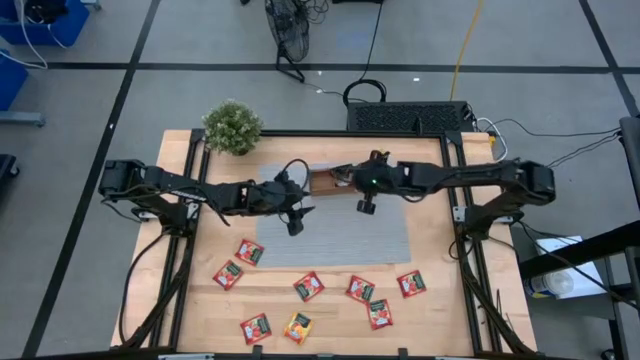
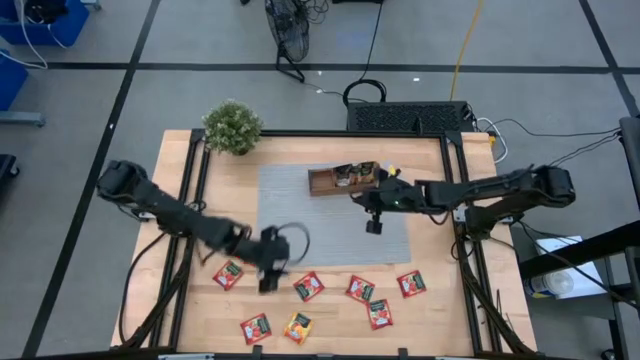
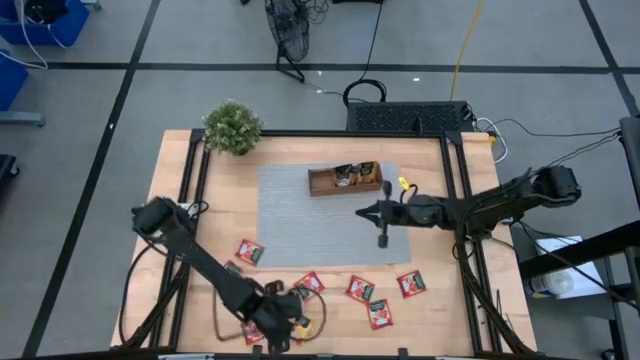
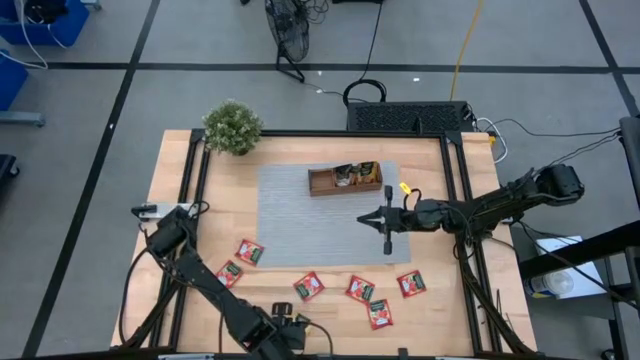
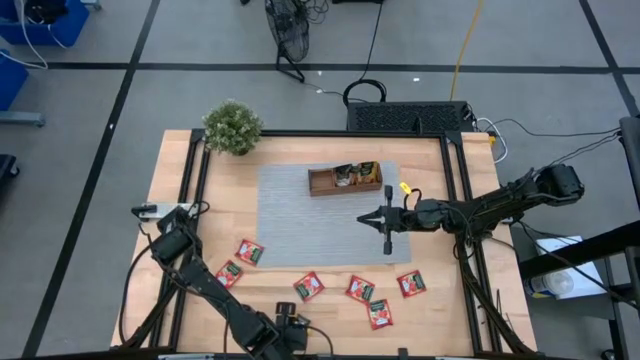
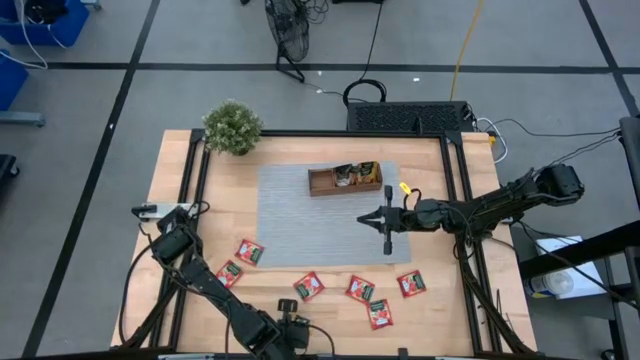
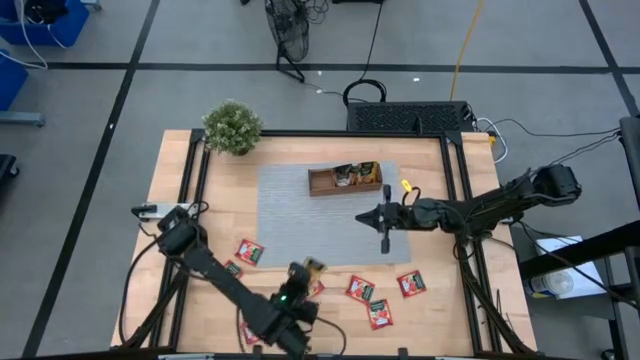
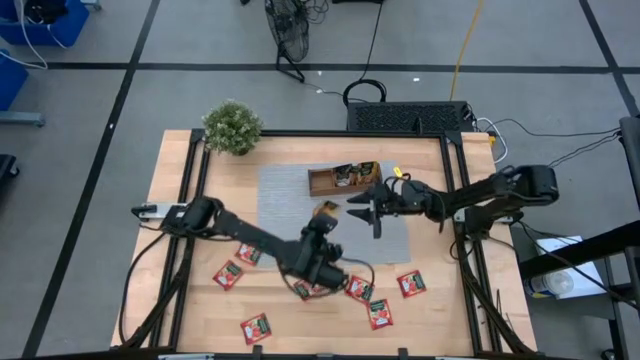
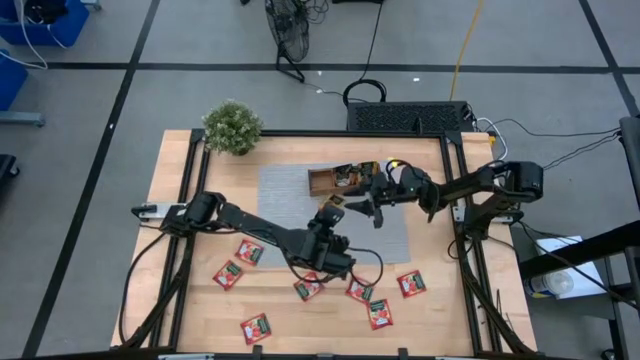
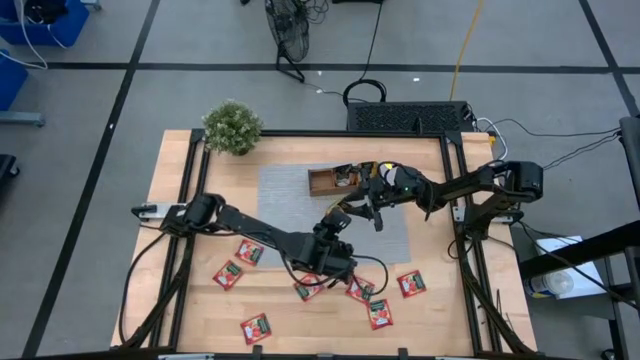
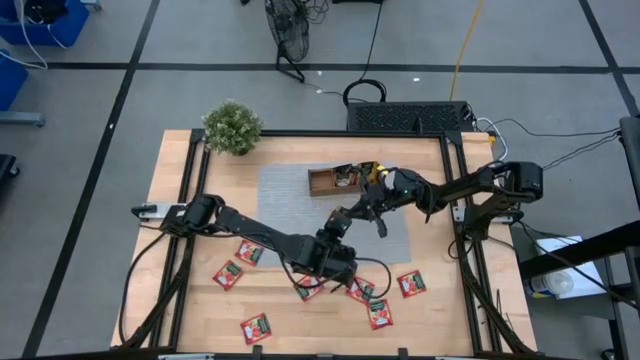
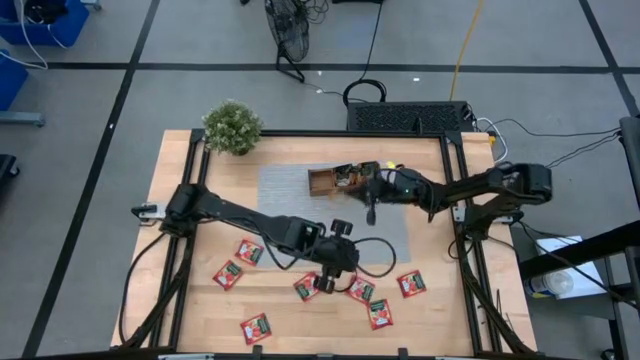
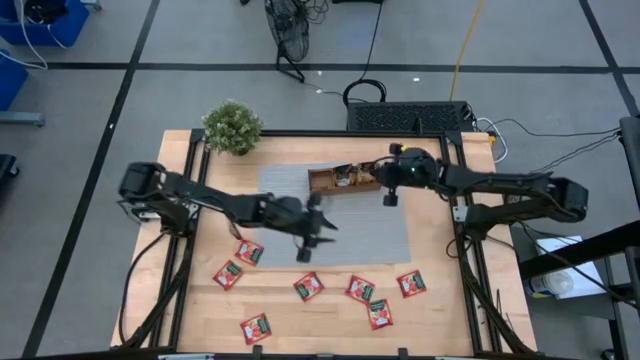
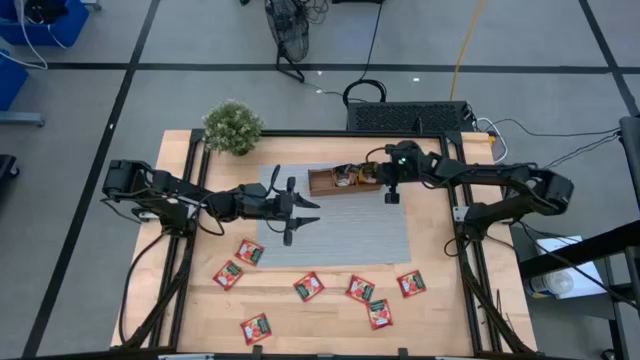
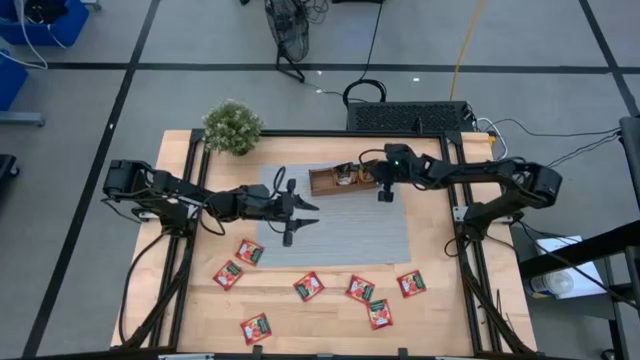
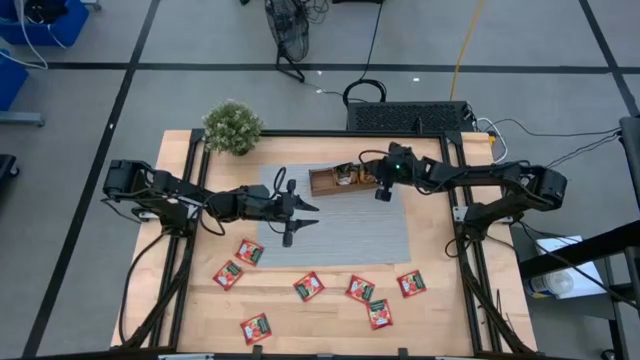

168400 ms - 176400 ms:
Task: Pick & Place Tea
Put the yellow tea bag into the right section of the wooden organizer

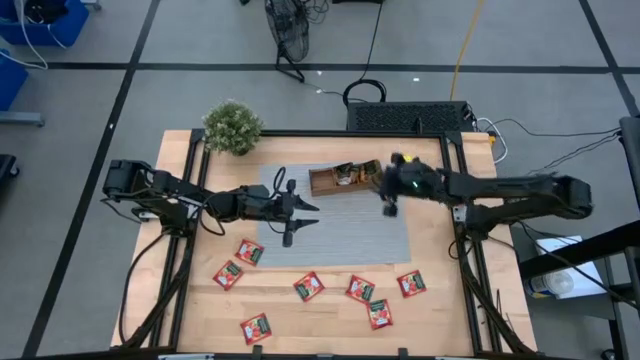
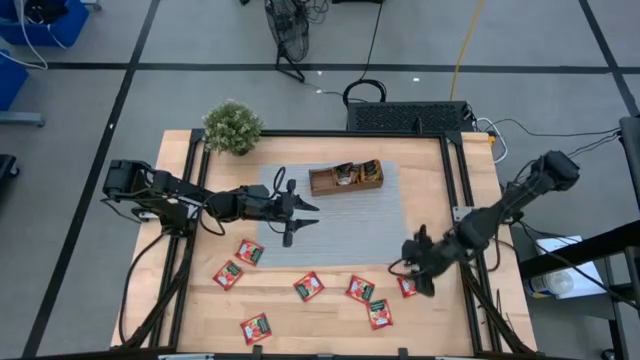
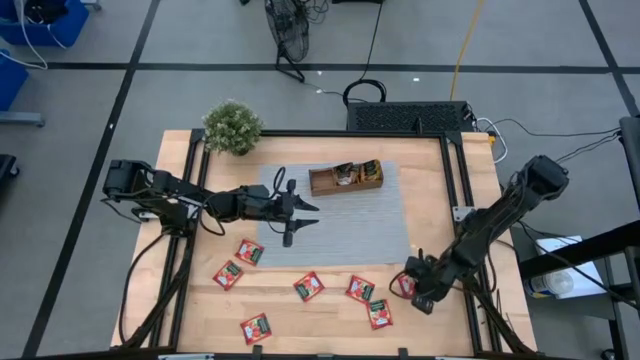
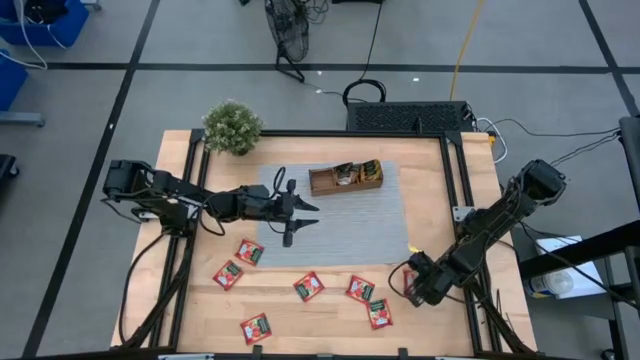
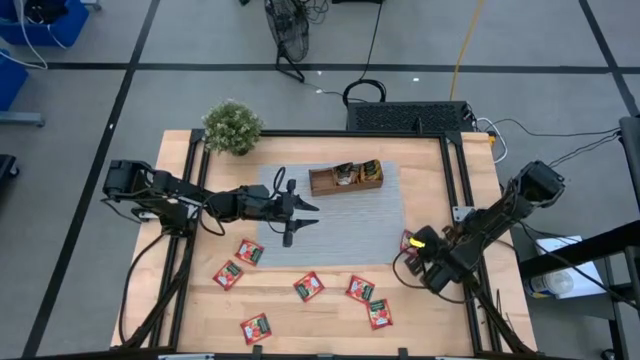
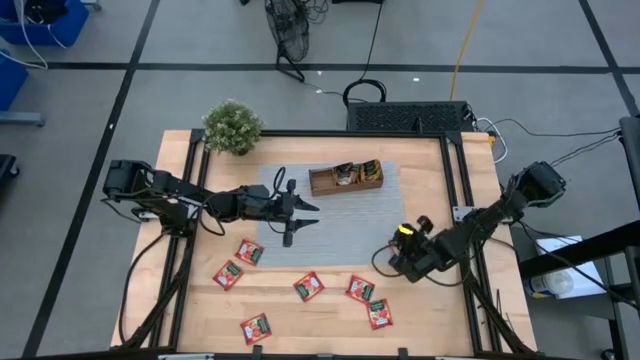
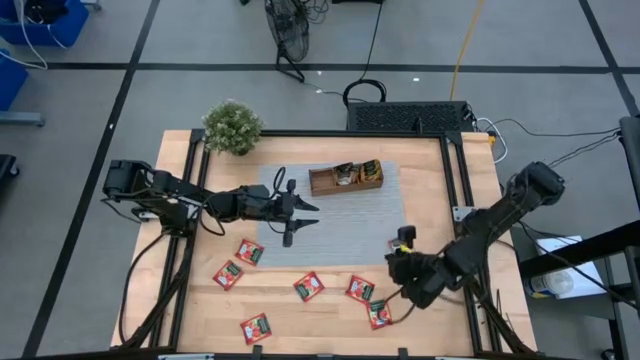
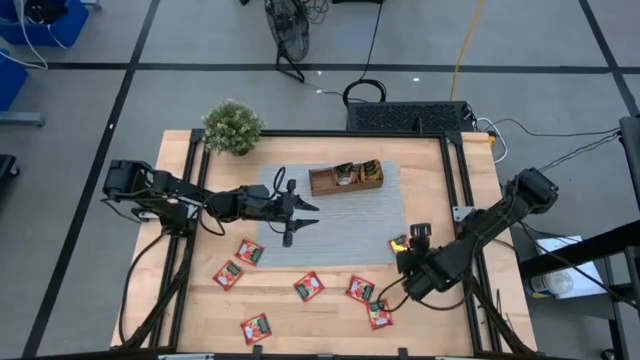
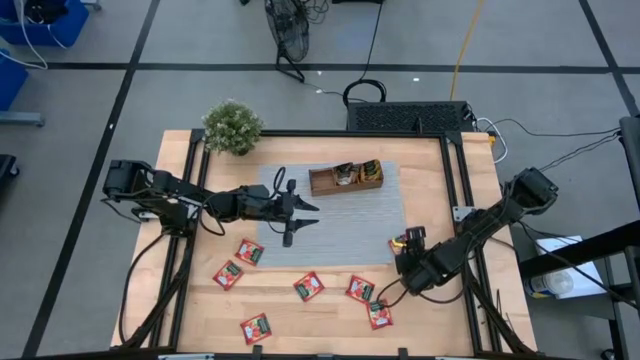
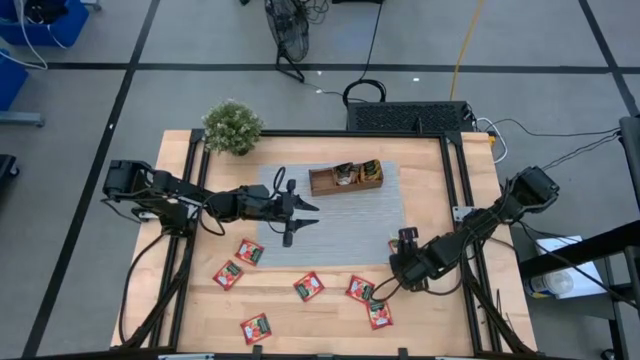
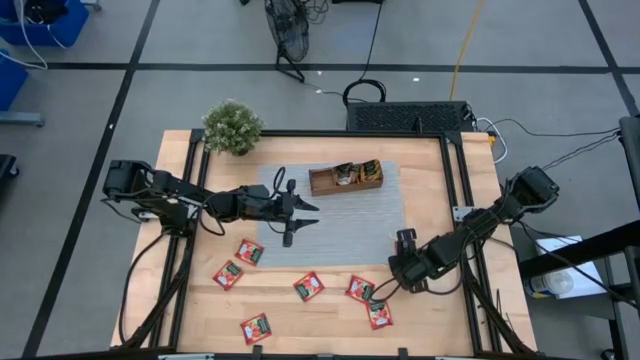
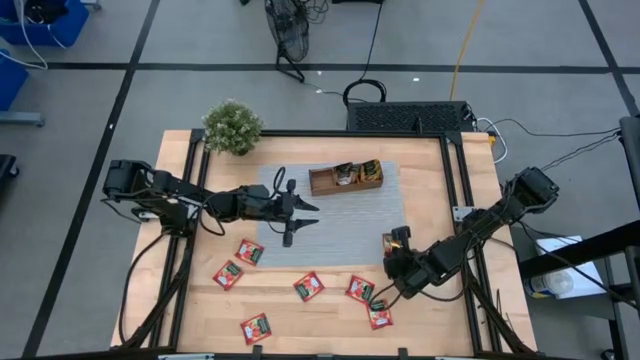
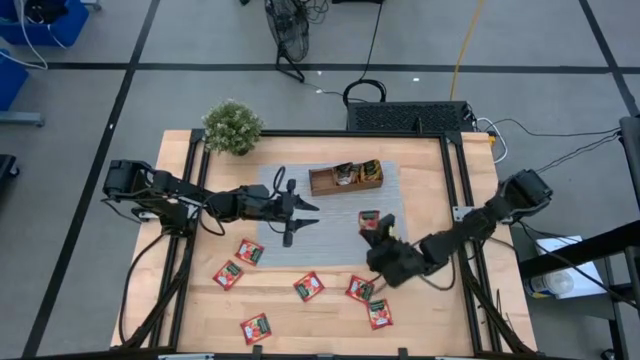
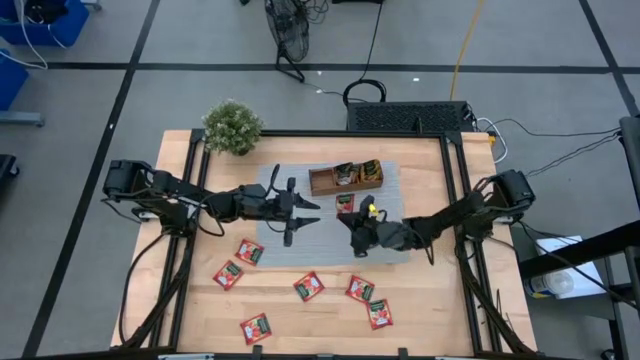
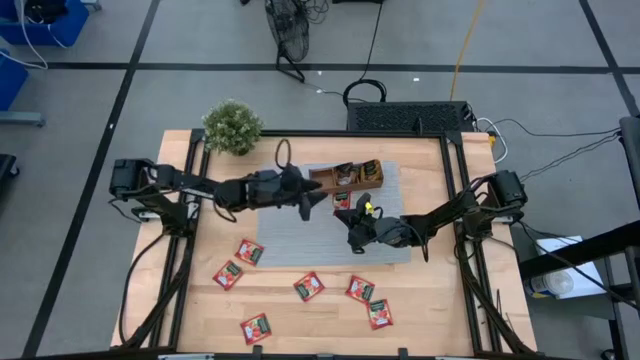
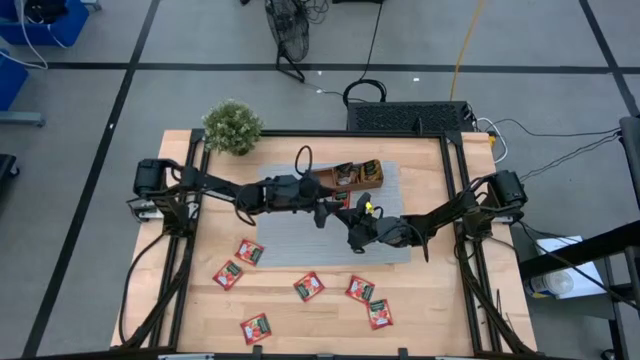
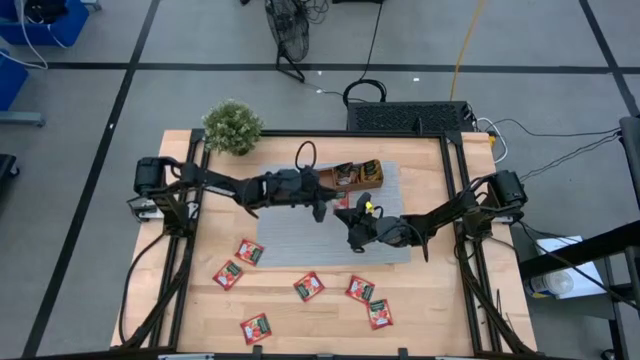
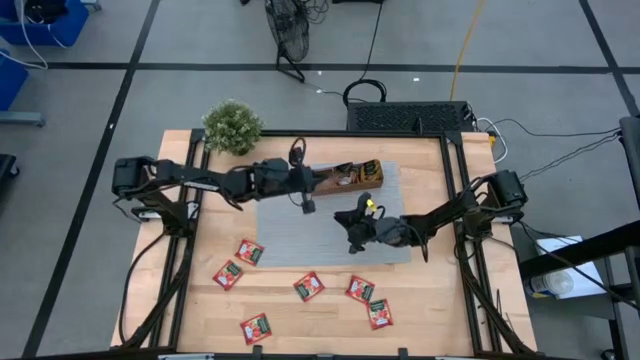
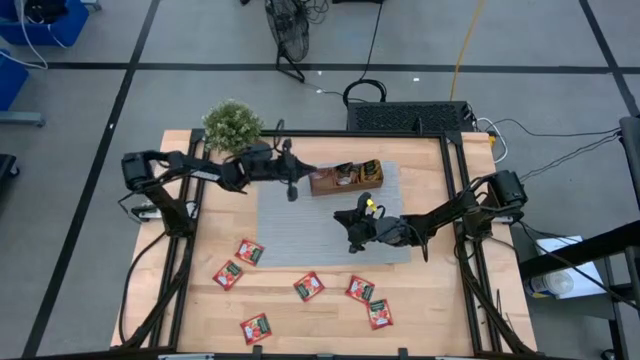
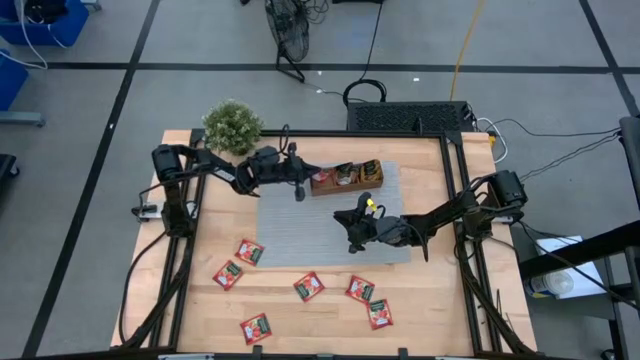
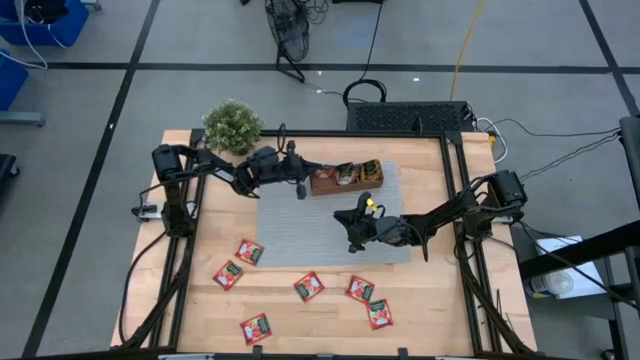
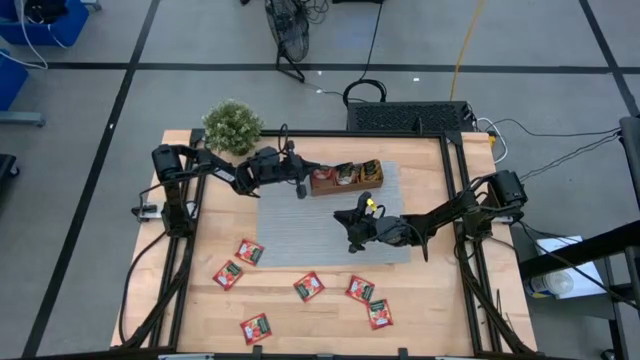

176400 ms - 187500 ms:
Put the red tea bag into the left section of the wooden organizer

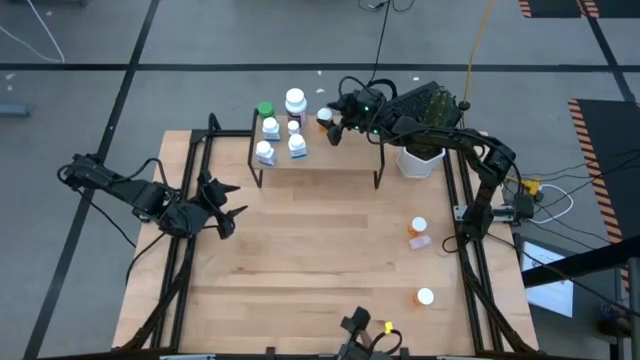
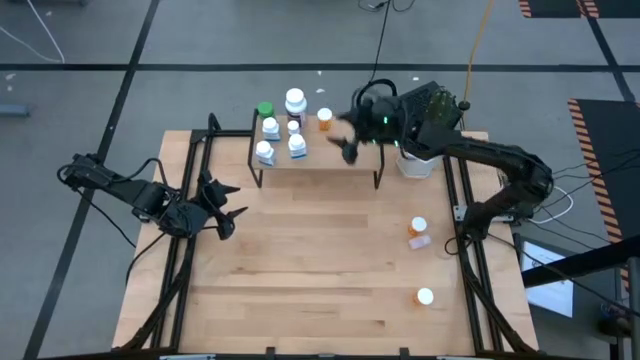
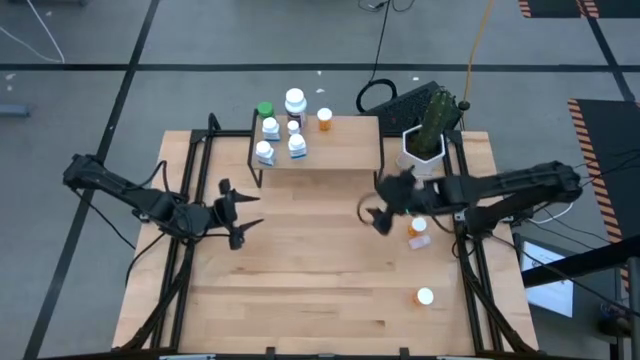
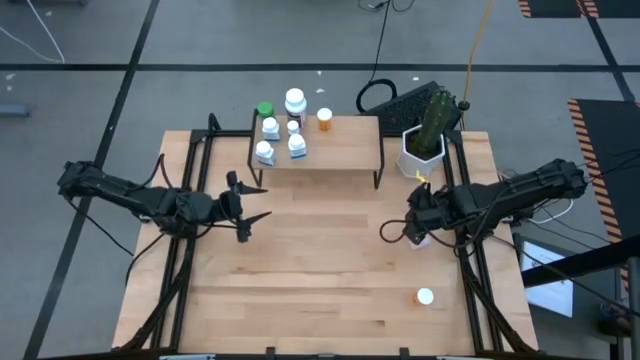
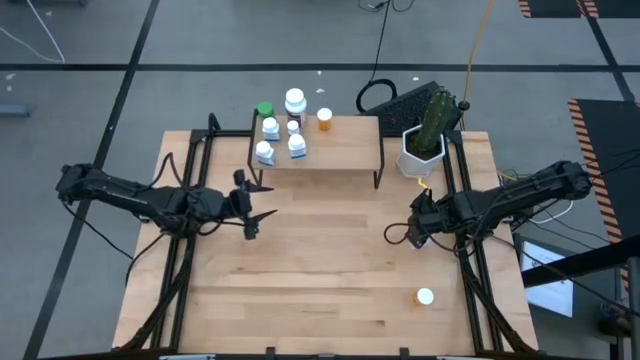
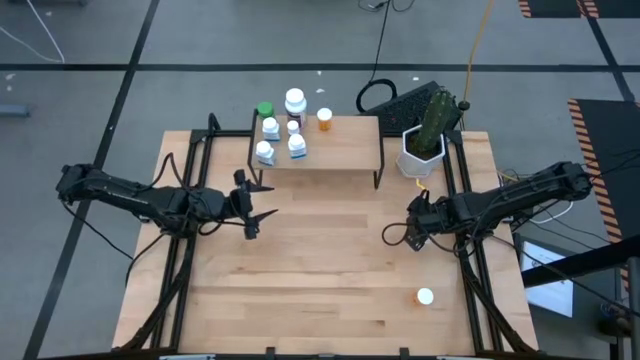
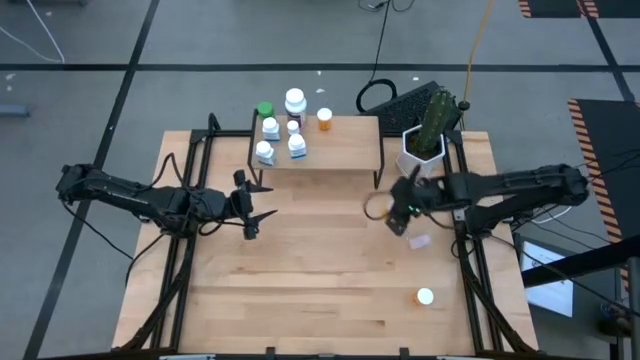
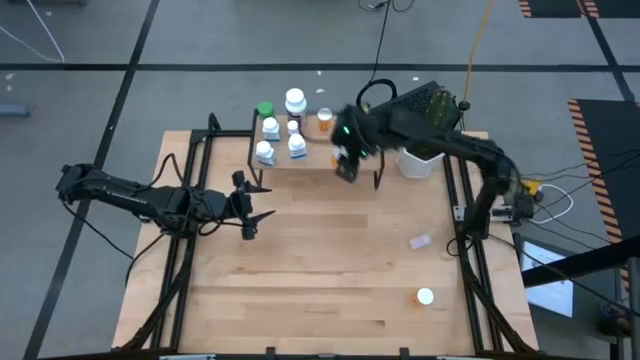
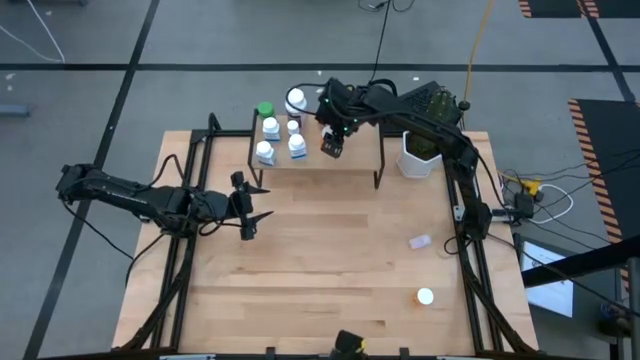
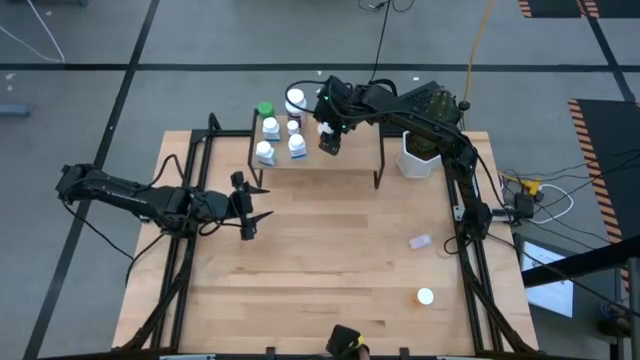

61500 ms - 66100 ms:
Task: Pick and place medicine bottles onto shelf by color
Put the top orange pill bottle on the shelf
